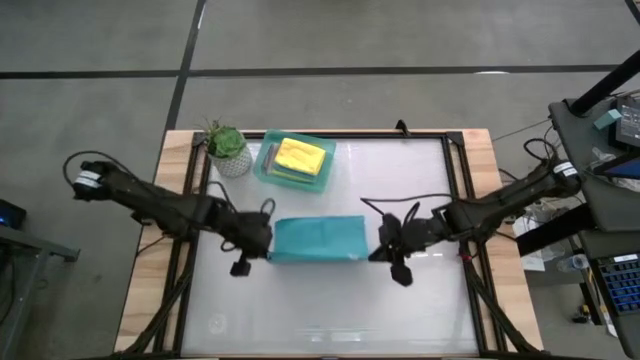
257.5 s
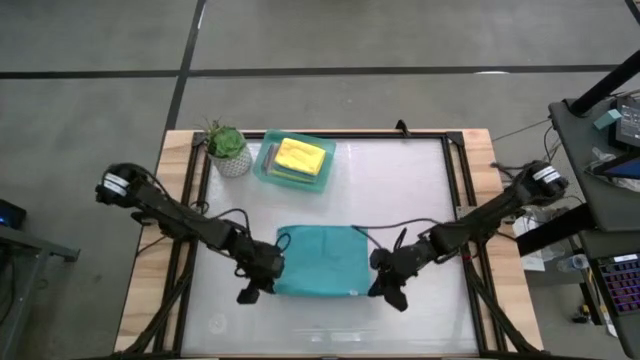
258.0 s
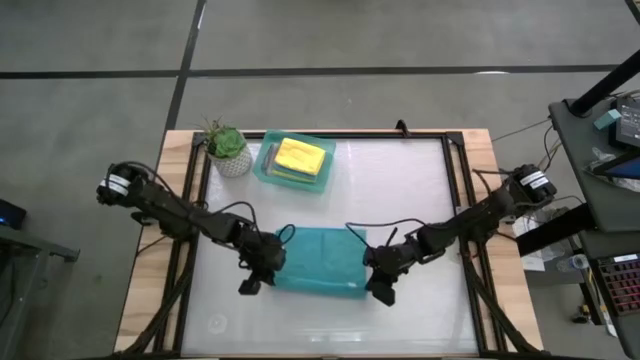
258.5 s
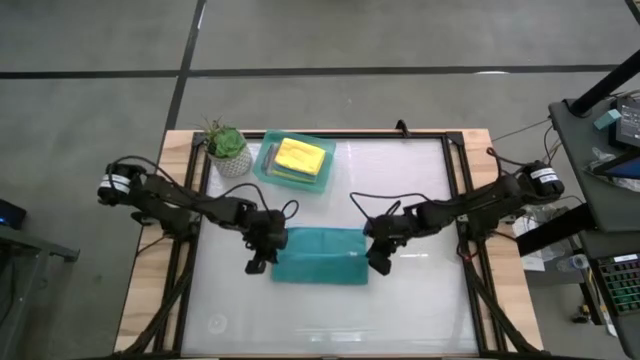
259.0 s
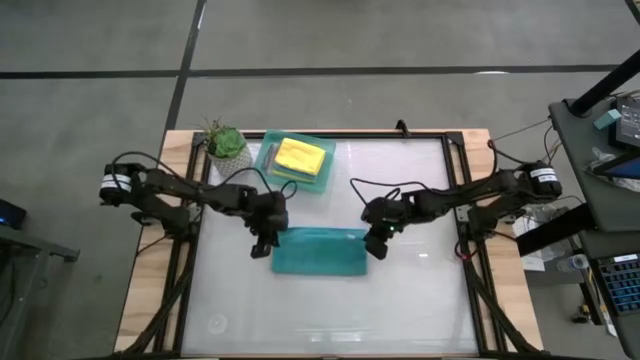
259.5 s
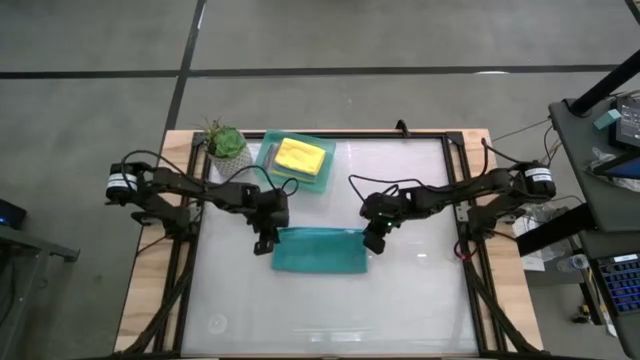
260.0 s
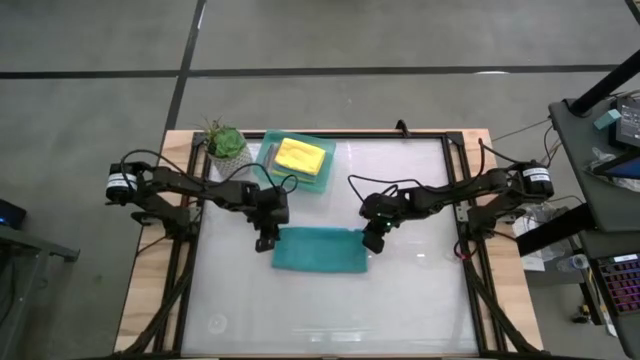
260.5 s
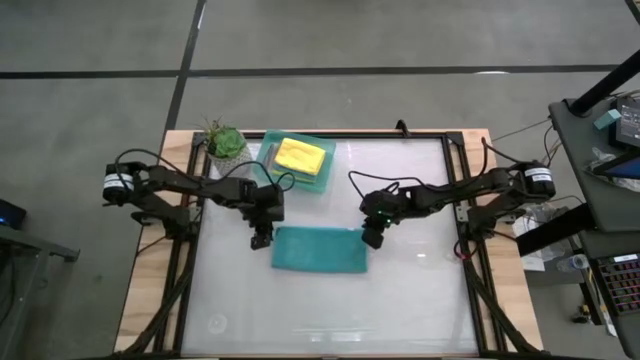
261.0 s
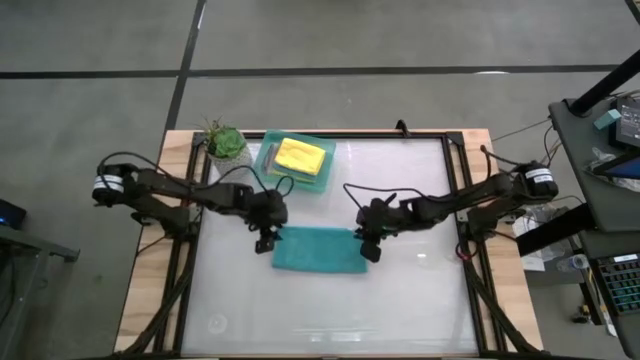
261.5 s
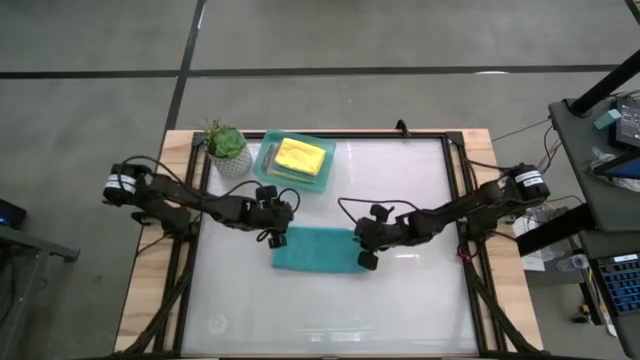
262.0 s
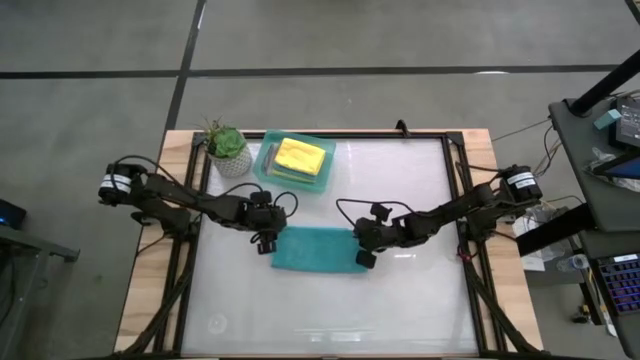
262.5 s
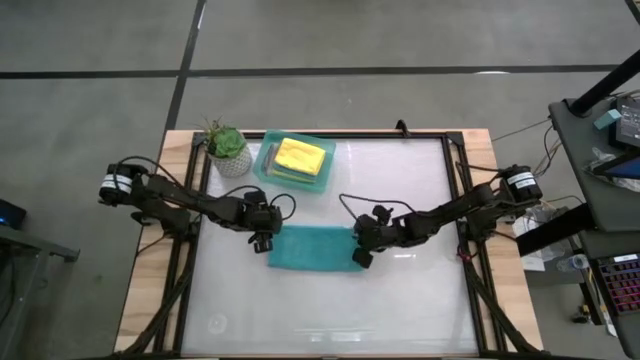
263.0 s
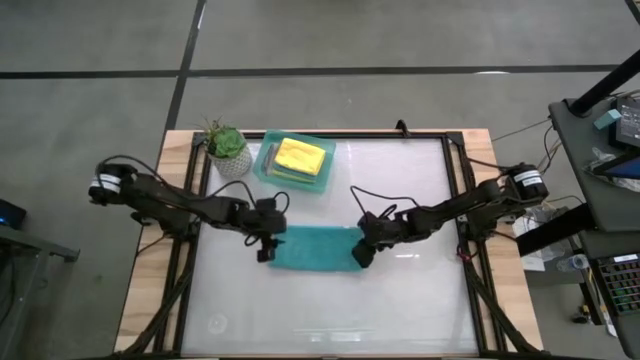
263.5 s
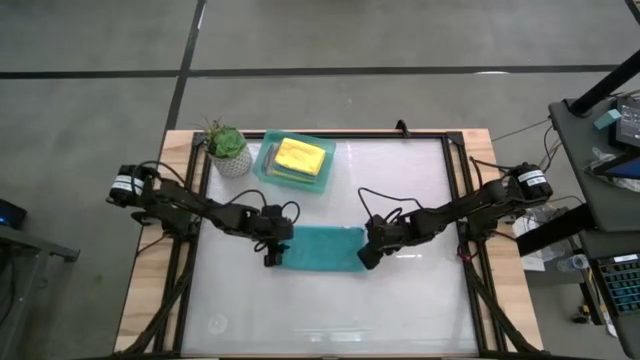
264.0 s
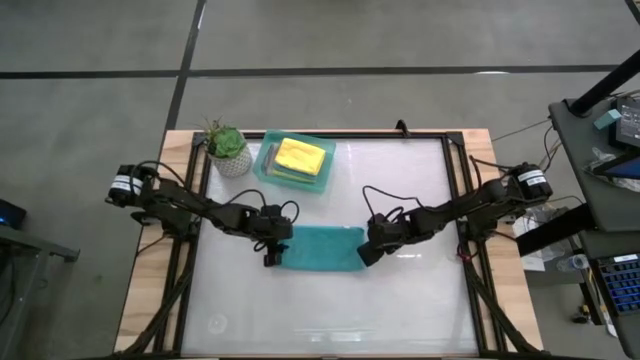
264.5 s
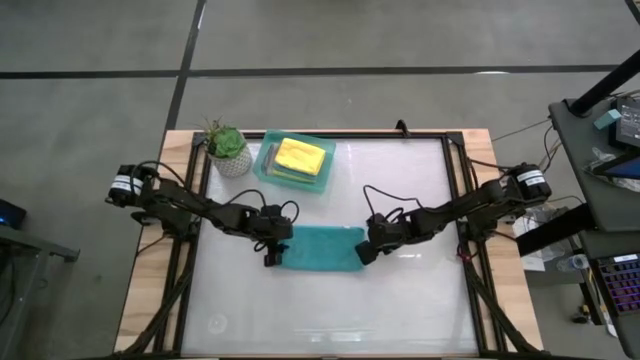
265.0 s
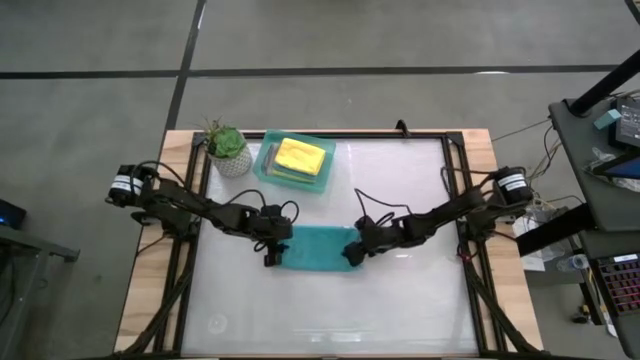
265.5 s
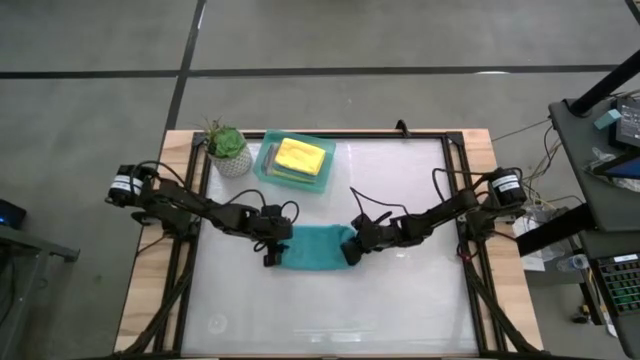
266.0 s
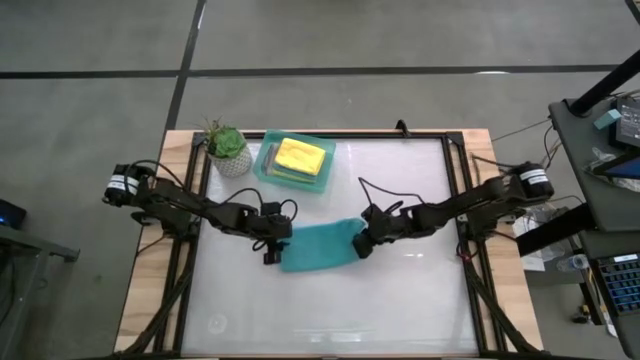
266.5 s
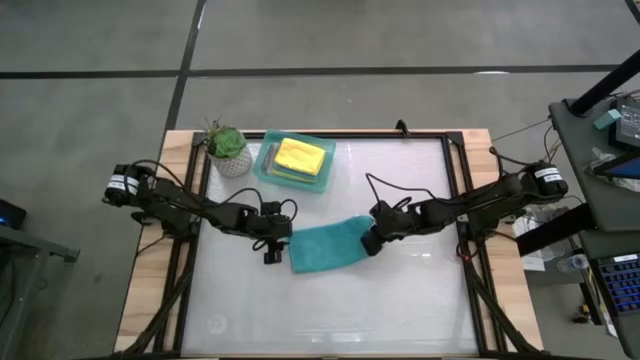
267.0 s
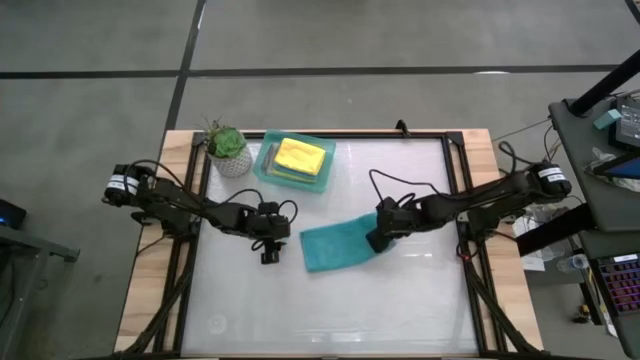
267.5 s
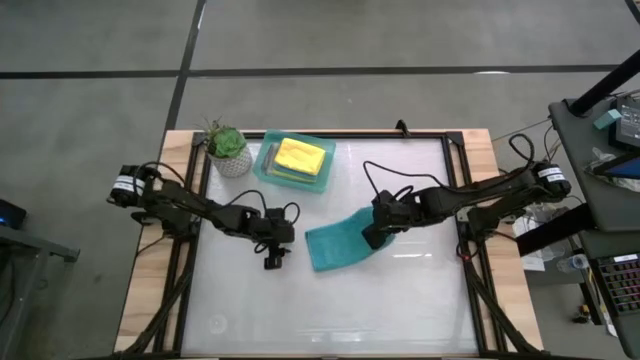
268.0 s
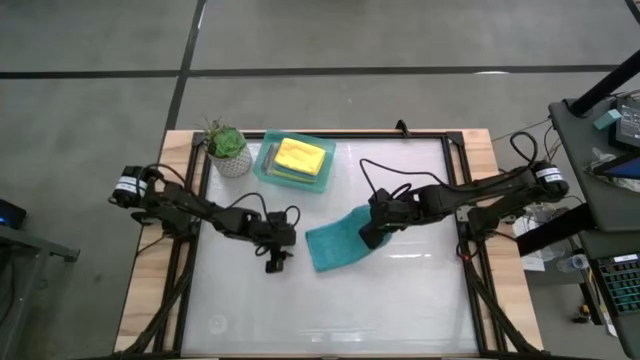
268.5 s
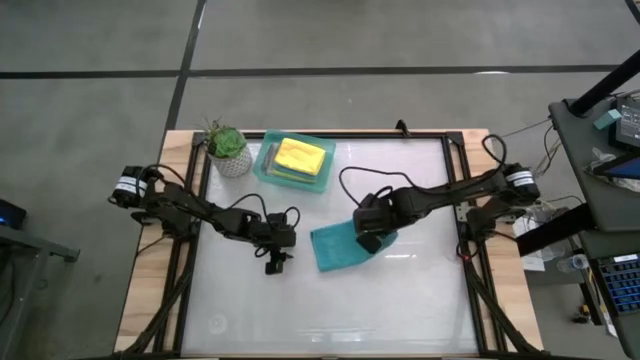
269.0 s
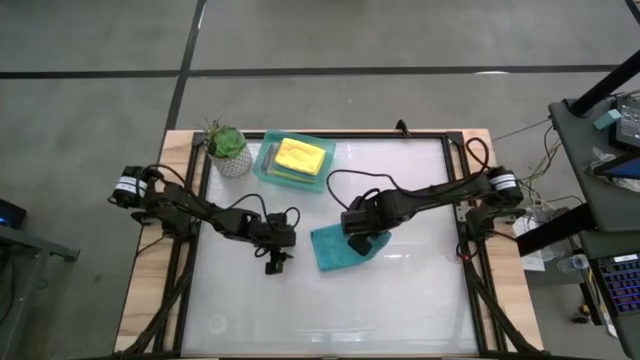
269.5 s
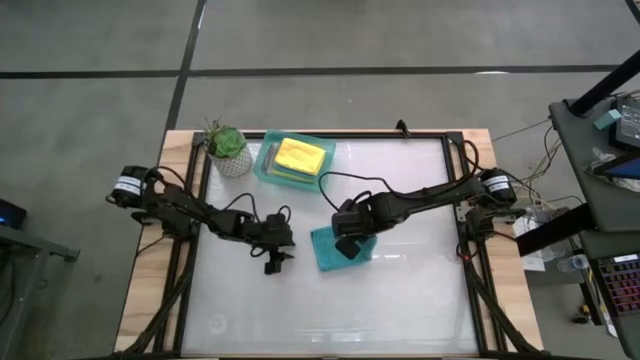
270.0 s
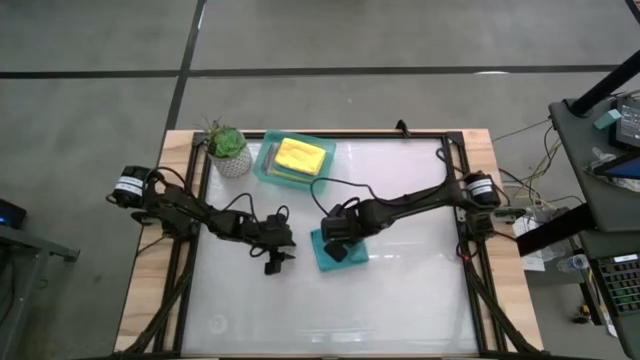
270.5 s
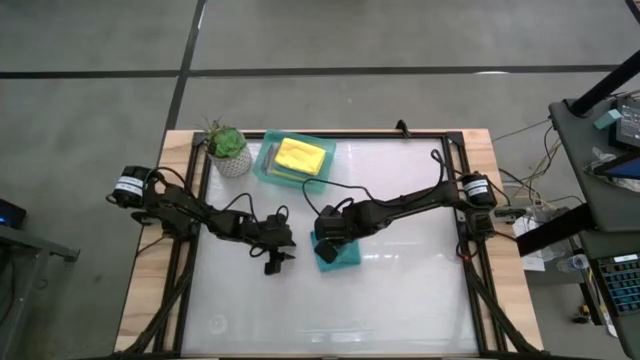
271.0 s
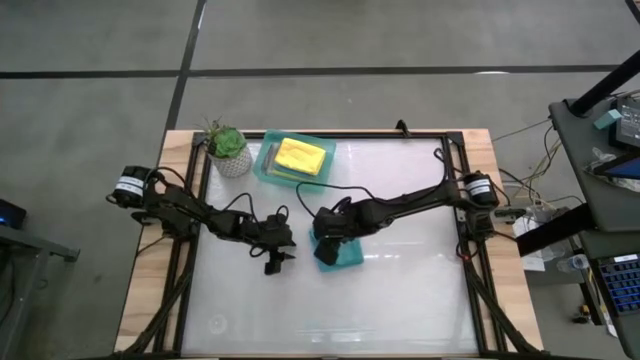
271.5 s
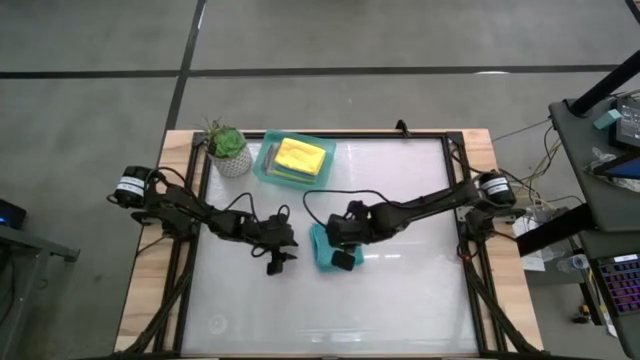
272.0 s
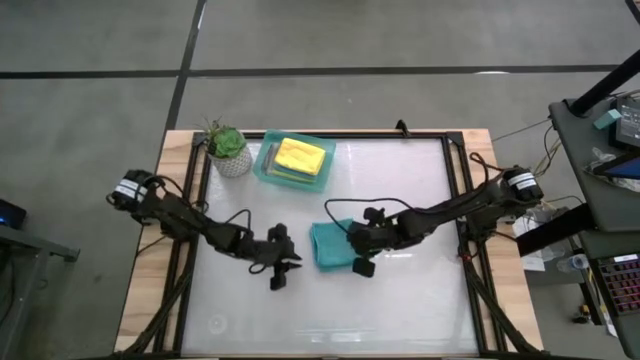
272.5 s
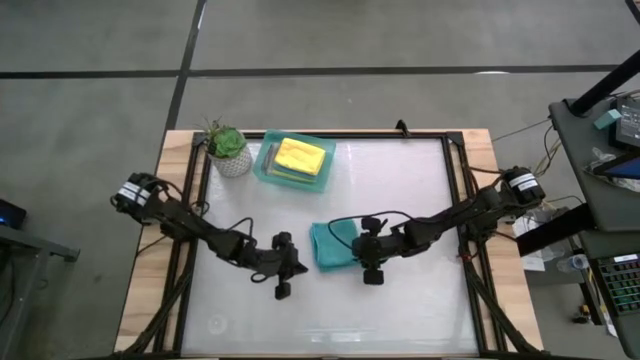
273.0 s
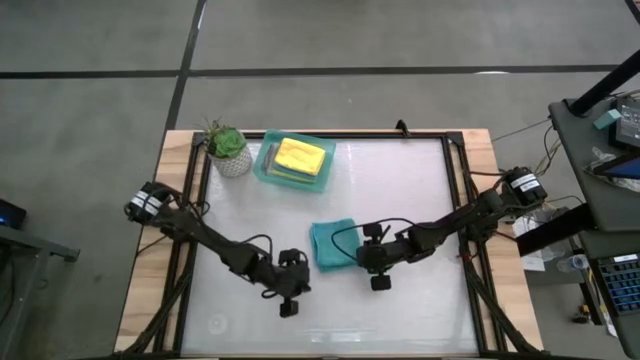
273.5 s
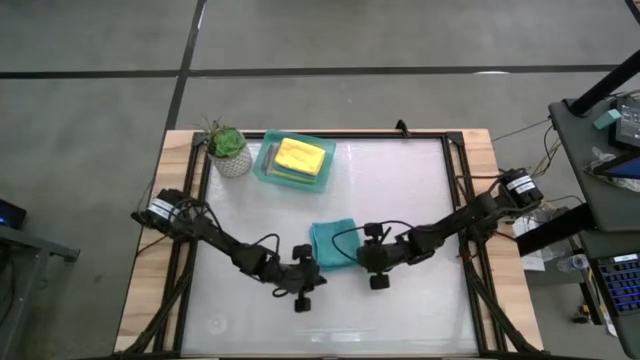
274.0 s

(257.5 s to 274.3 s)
Task: Fold microfiber towels
Fold the blue microfiber towel

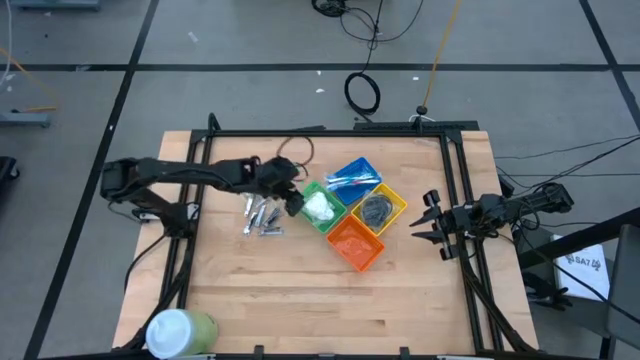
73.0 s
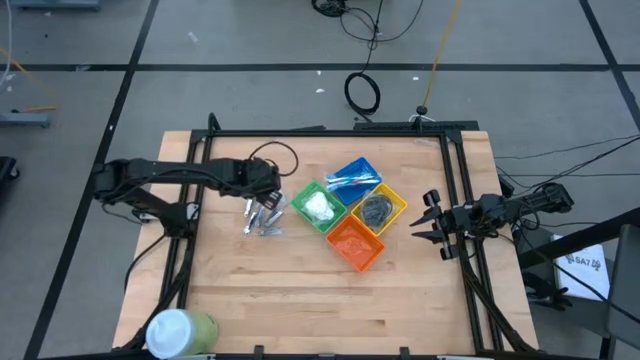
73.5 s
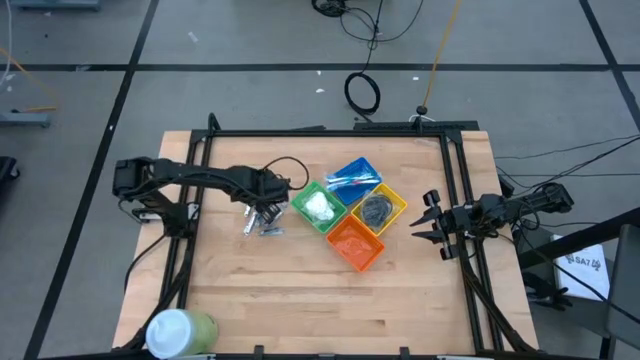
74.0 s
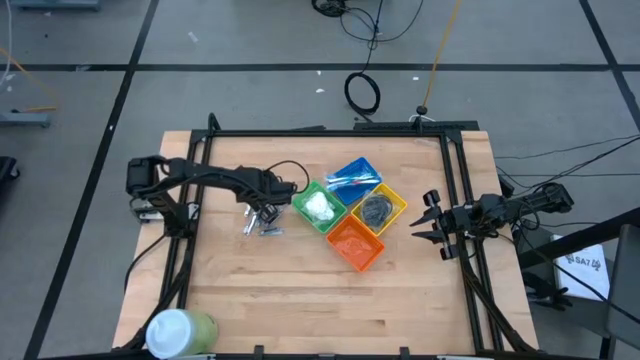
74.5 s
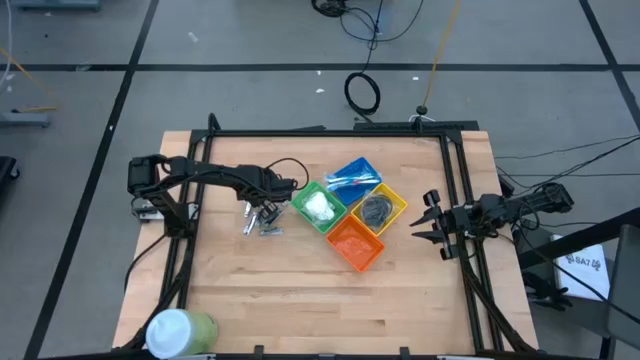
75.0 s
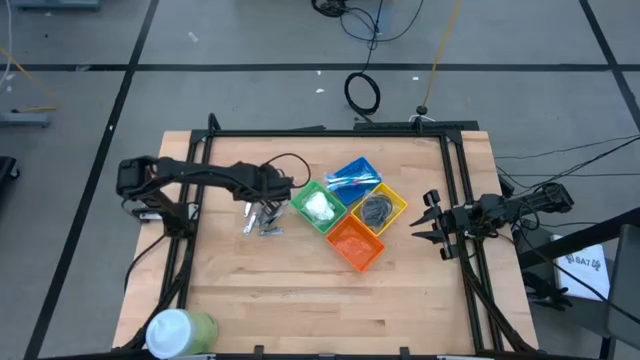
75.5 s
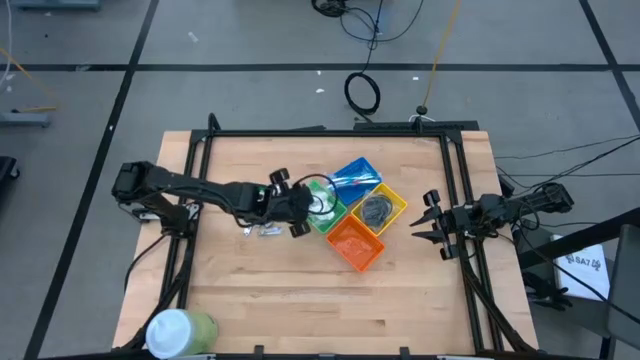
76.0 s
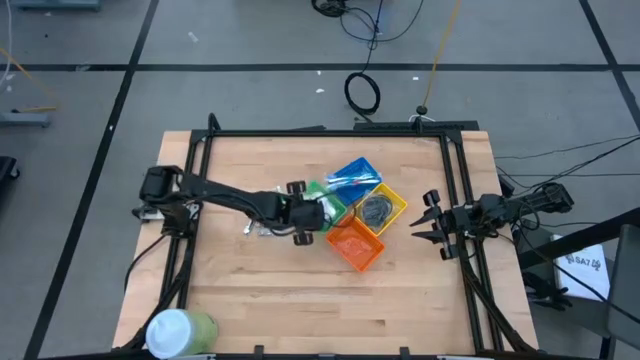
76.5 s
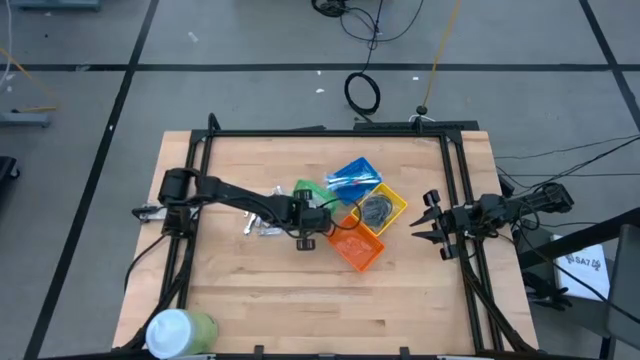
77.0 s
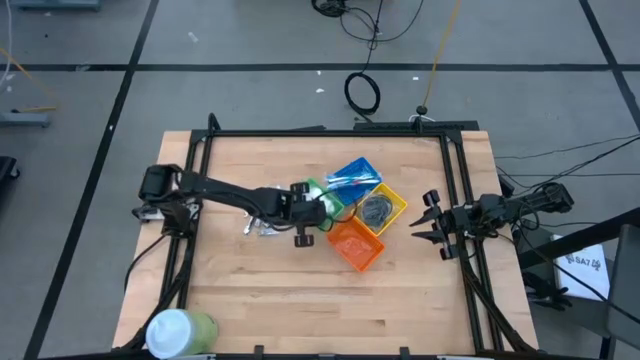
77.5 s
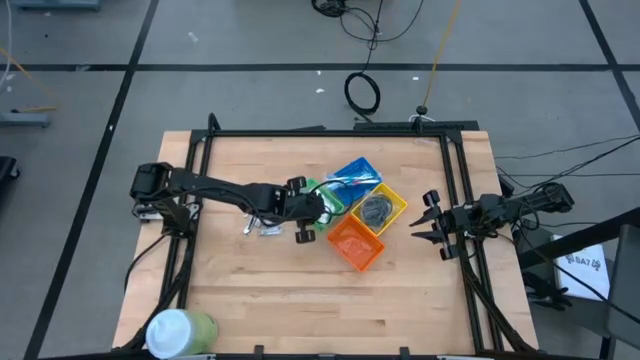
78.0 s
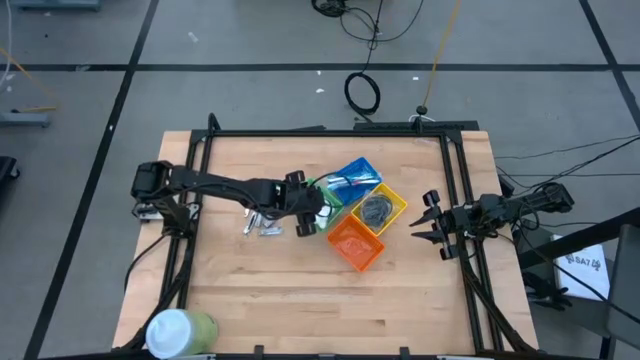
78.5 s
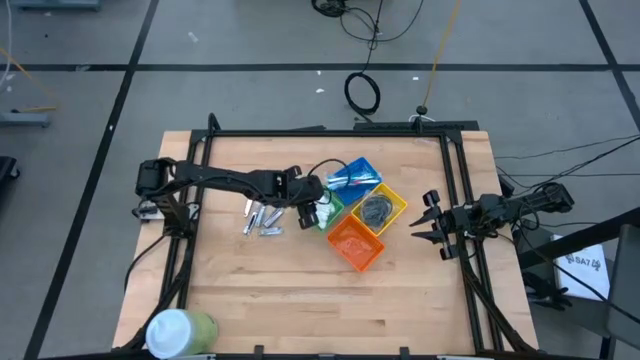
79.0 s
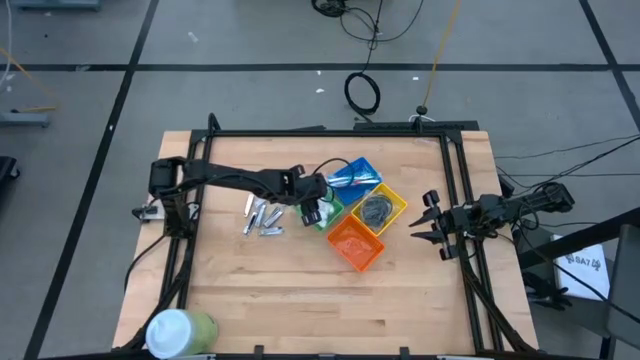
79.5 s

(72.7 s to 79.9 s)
Task: Pick & Place Travel size toiletries
Put the white cotton pack into the green bin
